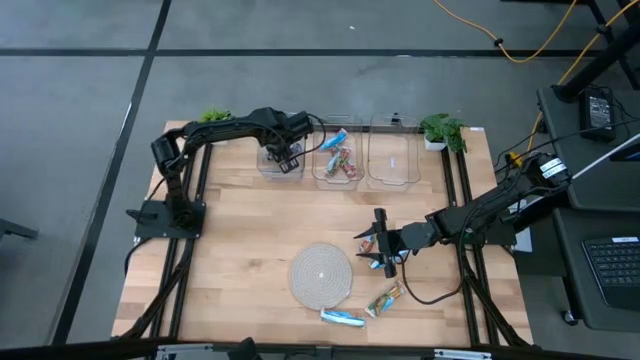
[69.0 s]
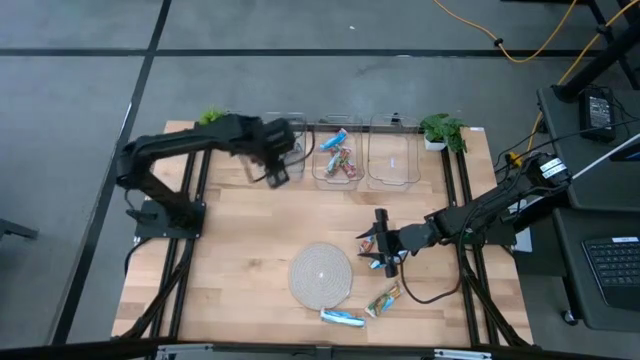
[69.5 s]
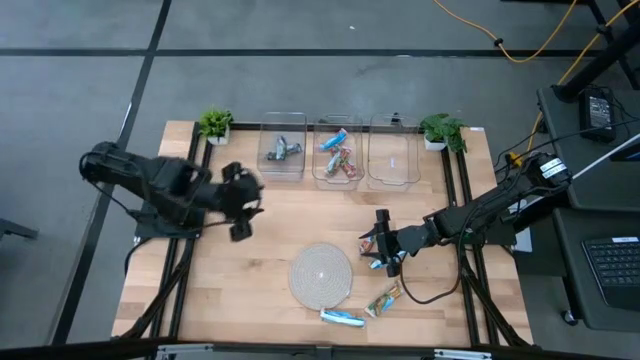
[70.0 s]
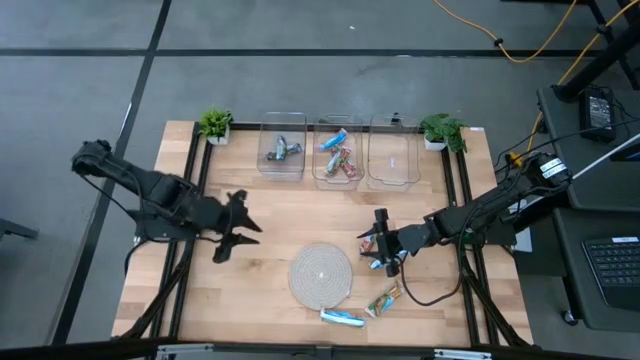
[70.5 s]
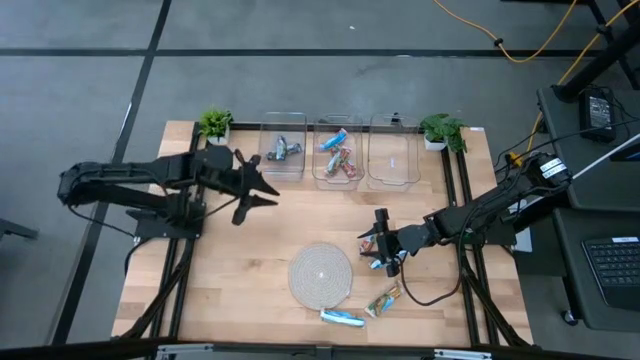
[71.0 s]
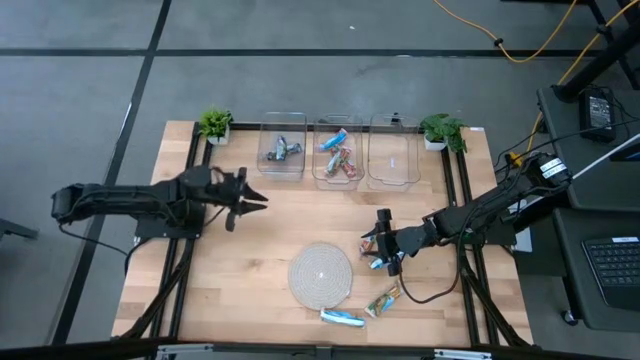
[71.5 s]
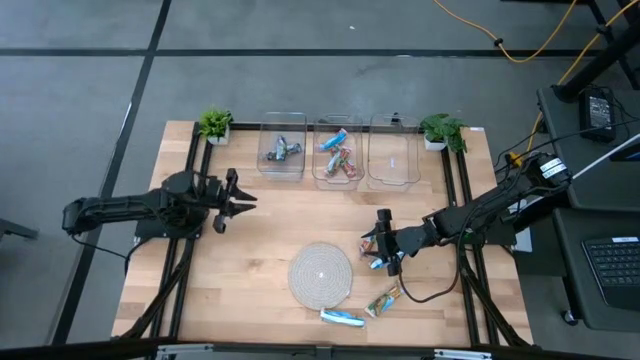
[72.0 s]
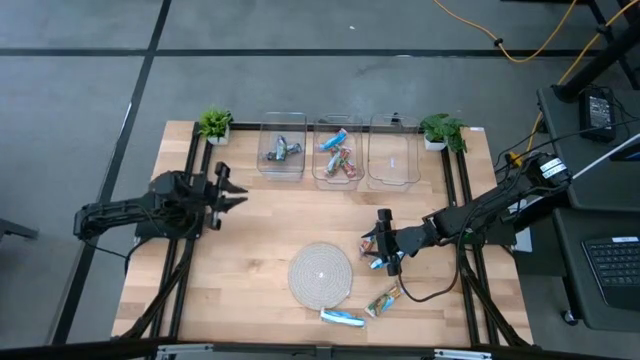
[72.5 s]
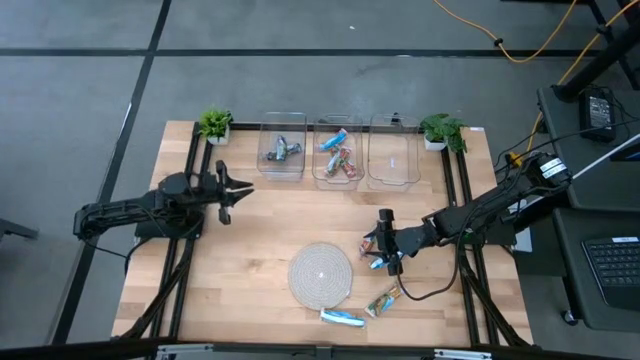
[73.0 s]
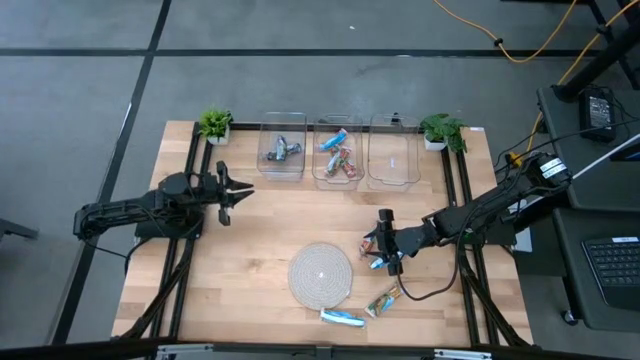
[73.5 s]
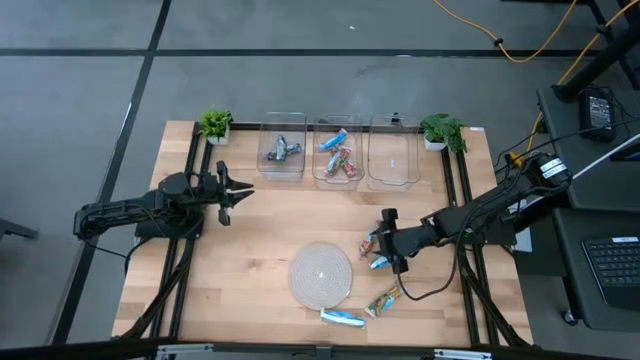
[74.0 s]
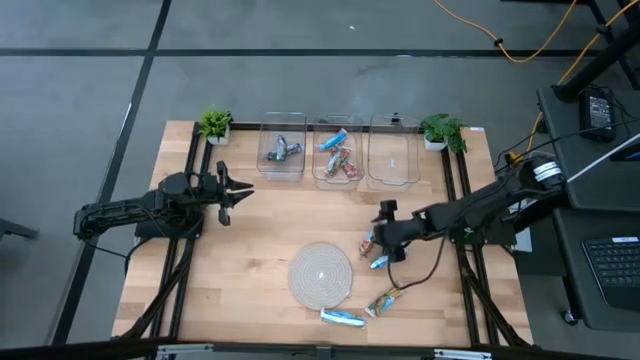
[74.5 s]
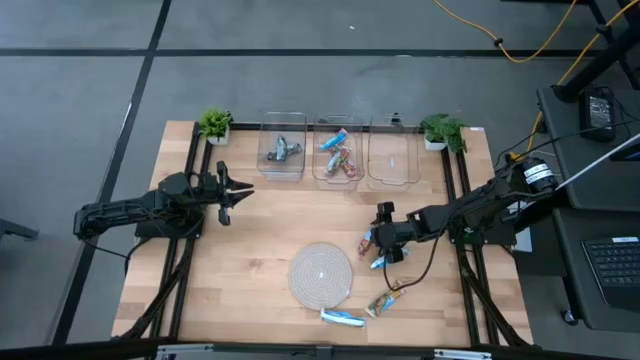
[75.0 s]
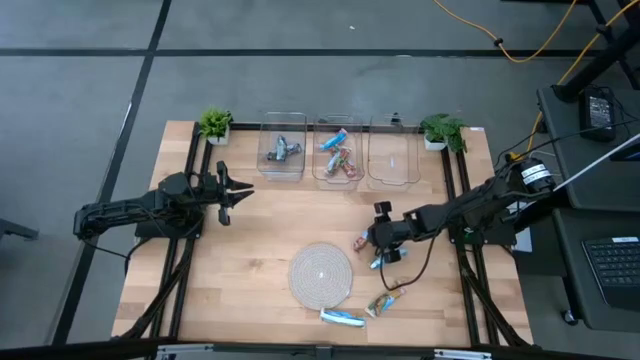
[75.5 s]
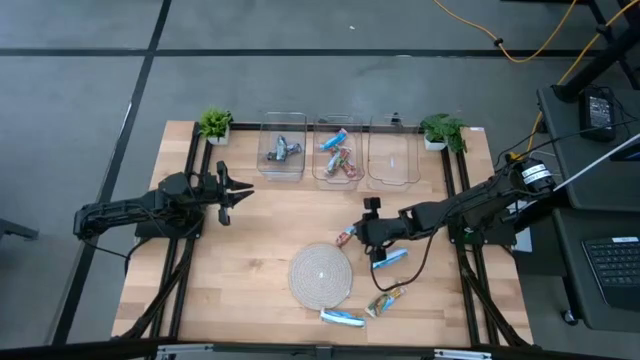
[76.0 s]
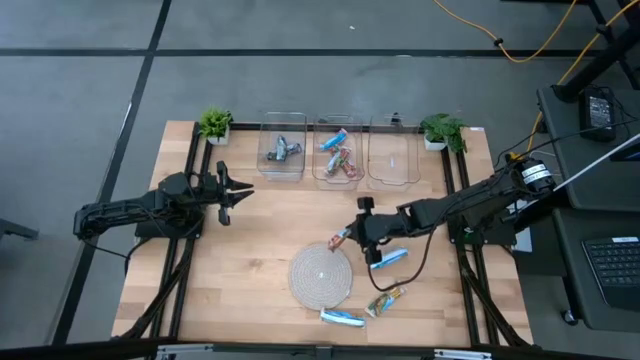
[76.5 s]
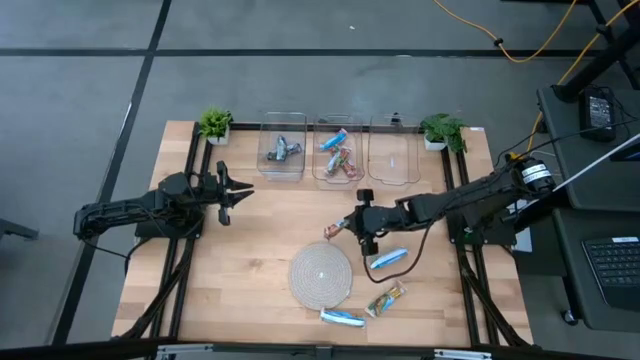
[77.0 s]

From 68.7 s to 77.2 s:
Task: Pick and place Granola Bars by type
Put the red granola bar into the center transparent bin

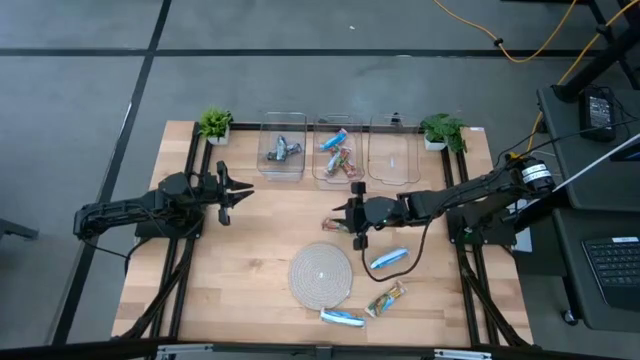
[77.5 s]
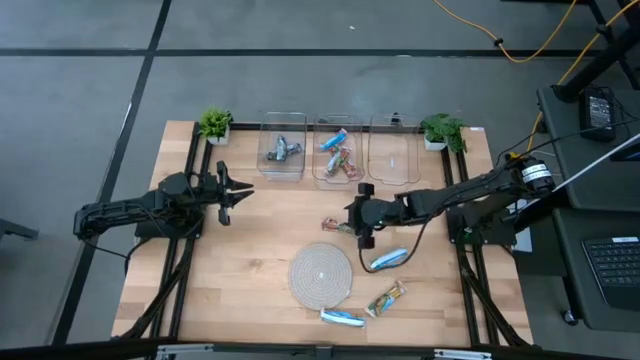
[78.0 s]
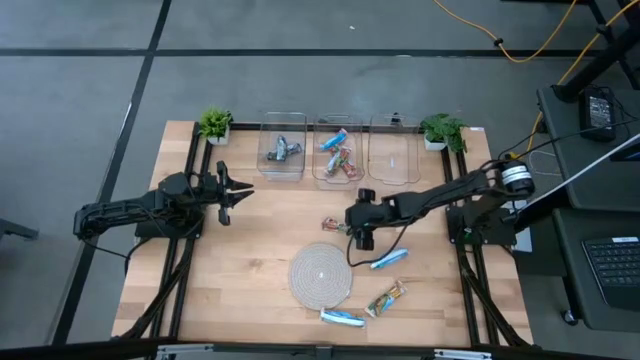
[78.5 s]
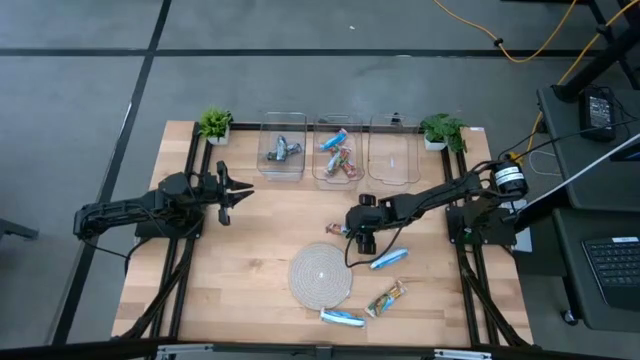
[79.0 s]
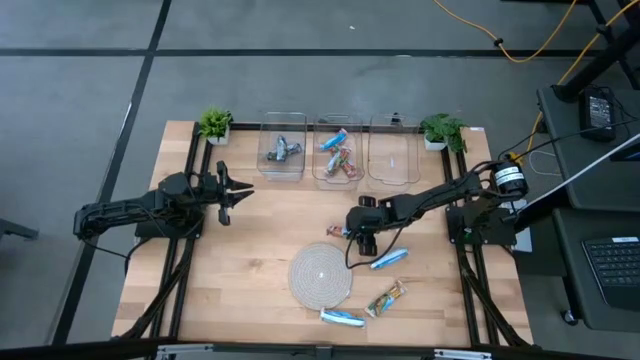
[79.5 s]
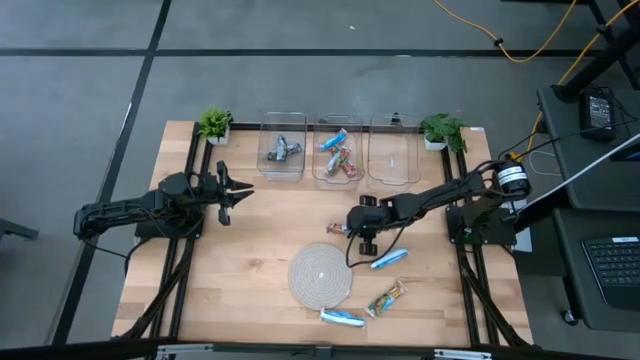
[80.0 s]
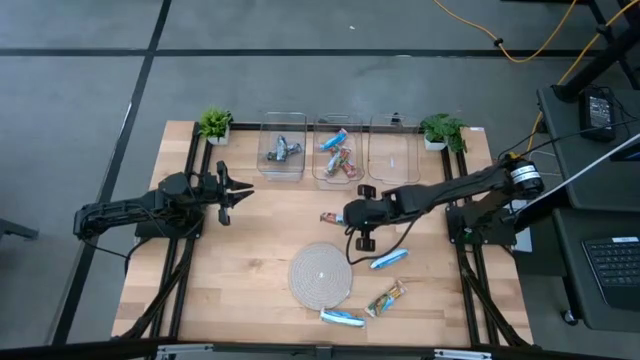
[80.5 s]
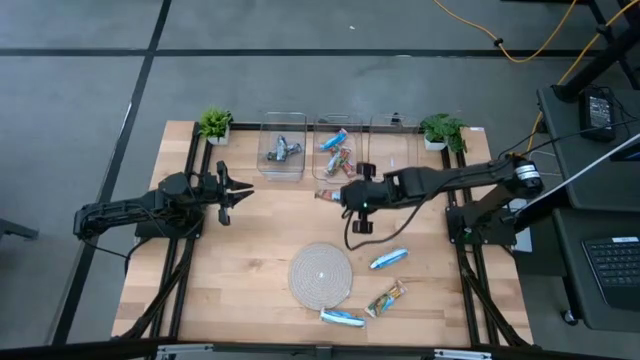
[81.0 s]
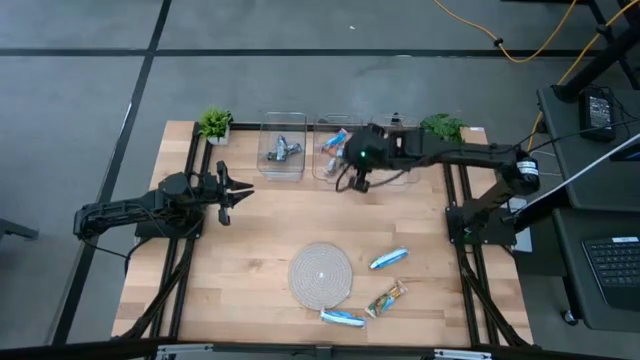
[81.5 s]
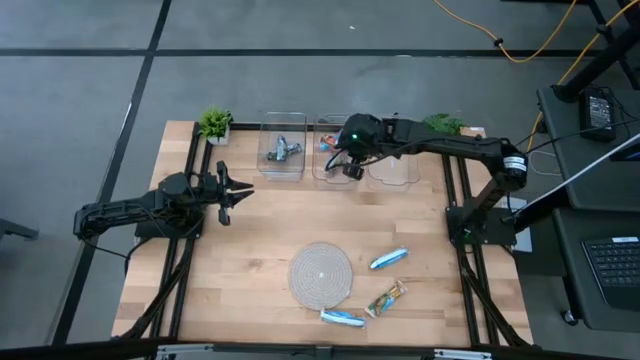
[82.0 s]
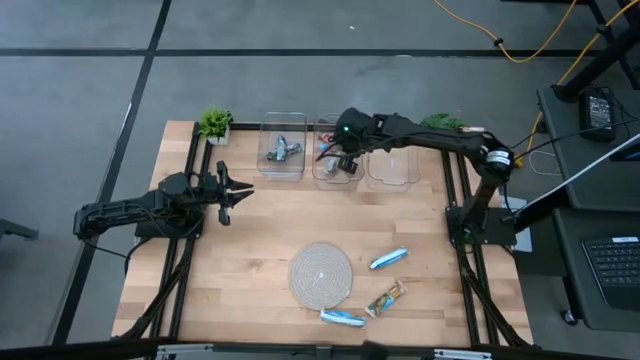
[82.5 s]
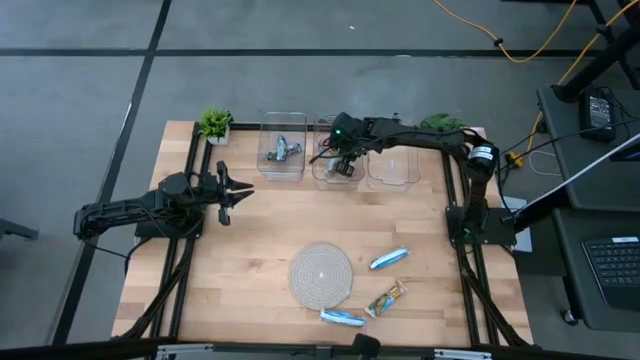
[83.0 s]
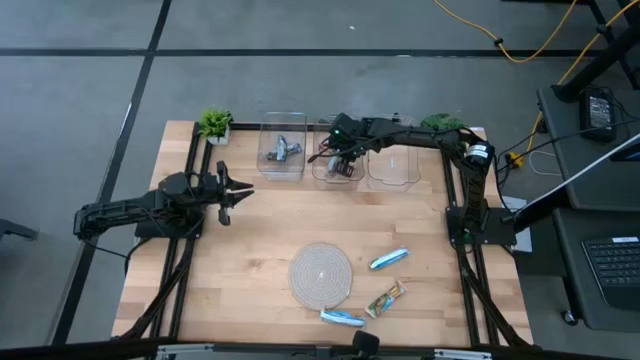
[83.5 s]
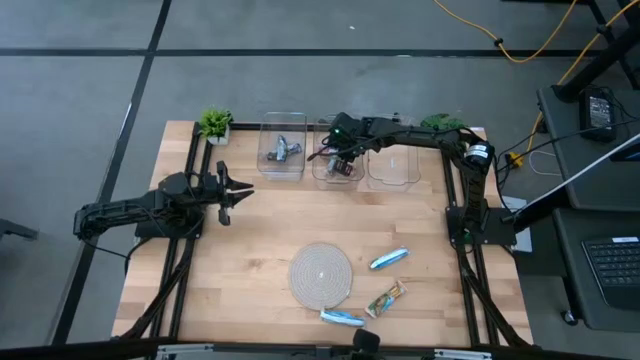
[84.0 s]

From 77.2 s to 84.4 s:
Put the red granola bar into the center transparent bin

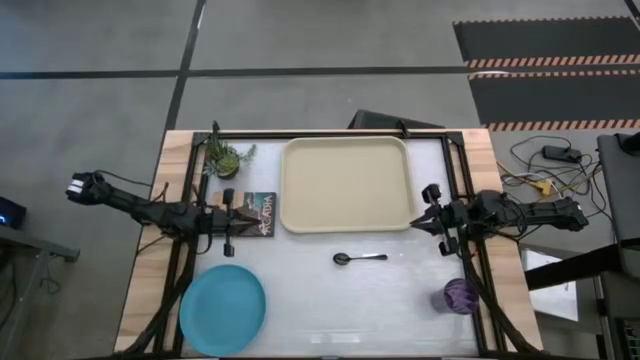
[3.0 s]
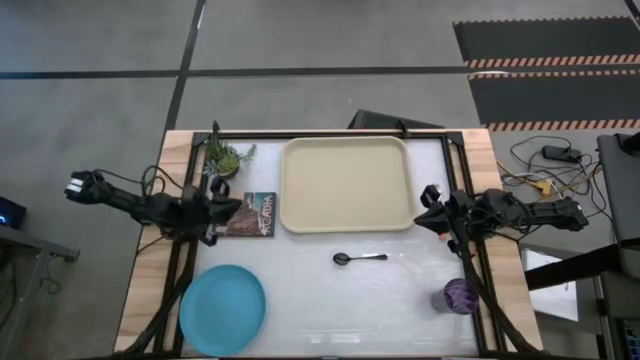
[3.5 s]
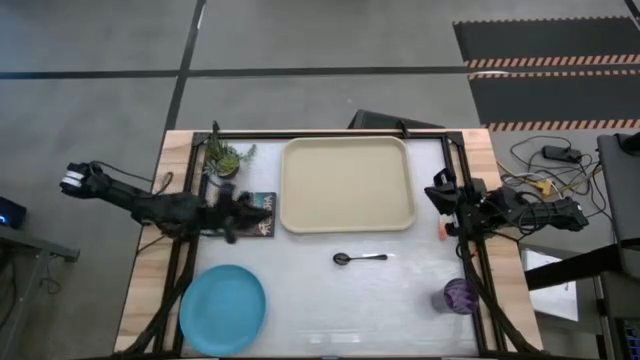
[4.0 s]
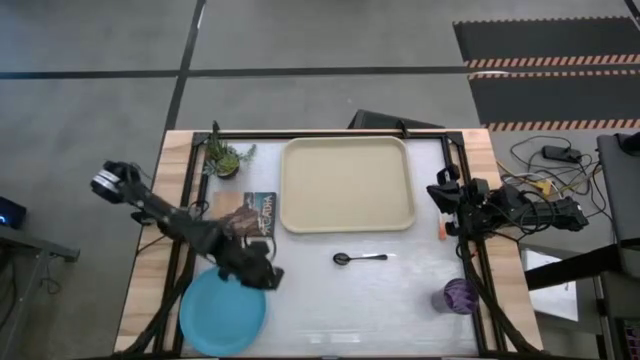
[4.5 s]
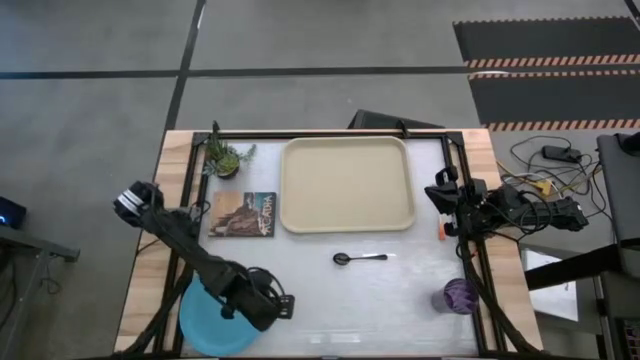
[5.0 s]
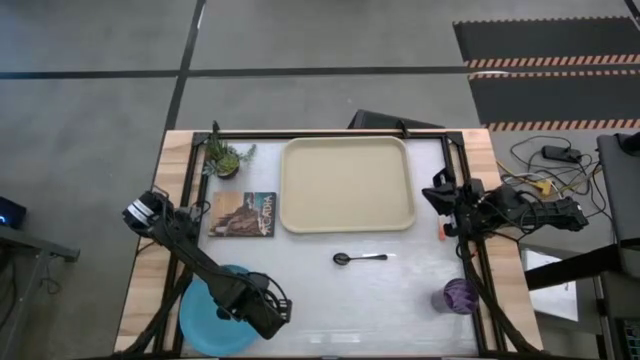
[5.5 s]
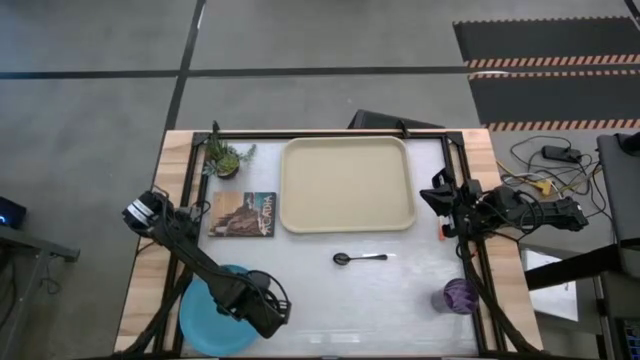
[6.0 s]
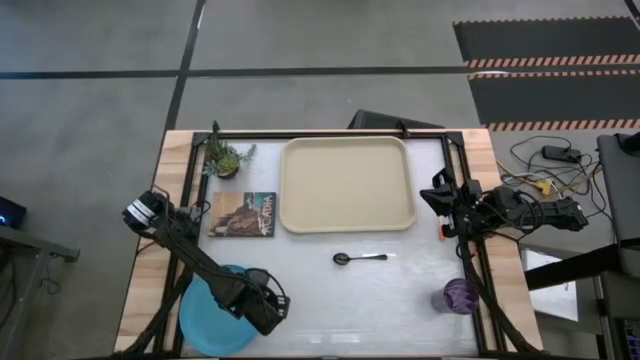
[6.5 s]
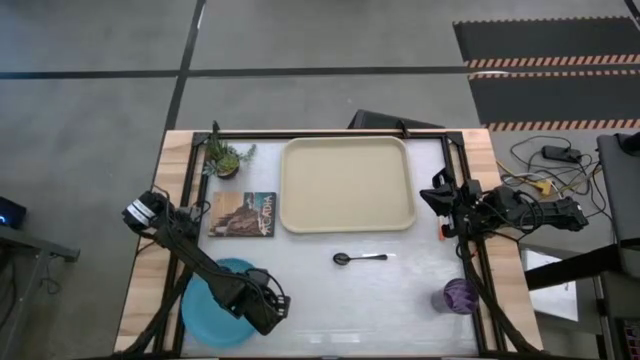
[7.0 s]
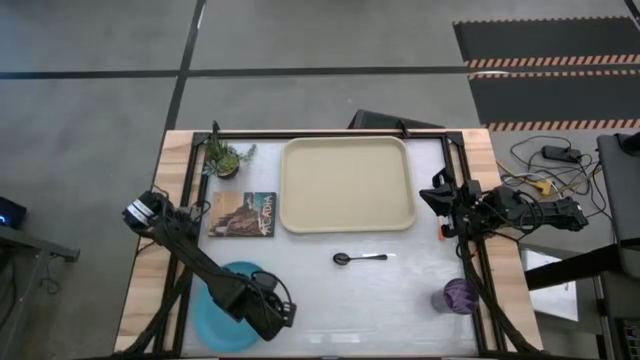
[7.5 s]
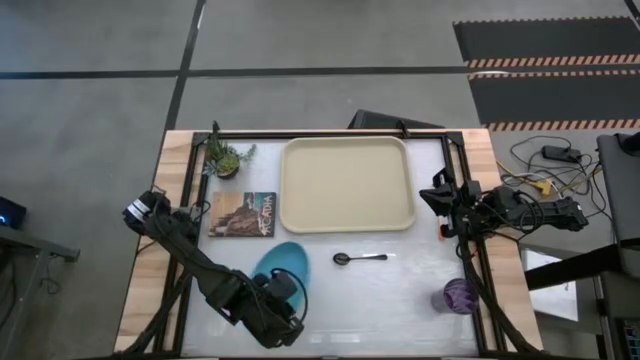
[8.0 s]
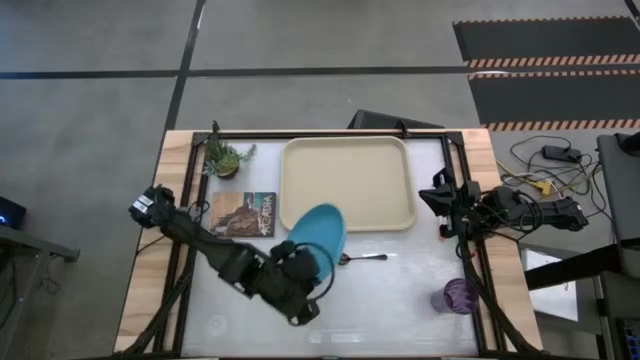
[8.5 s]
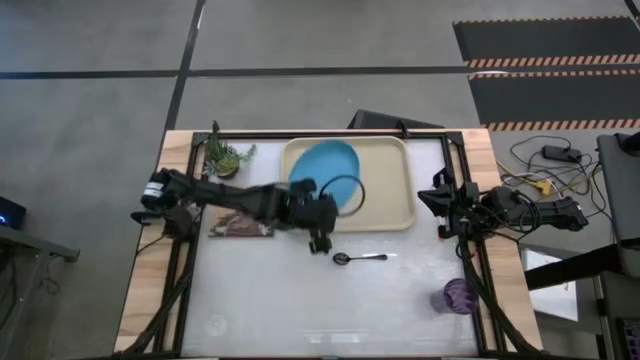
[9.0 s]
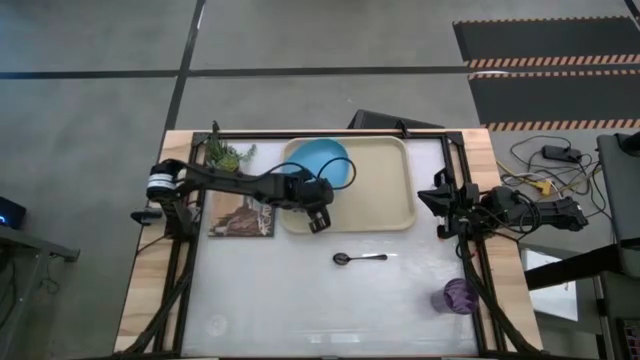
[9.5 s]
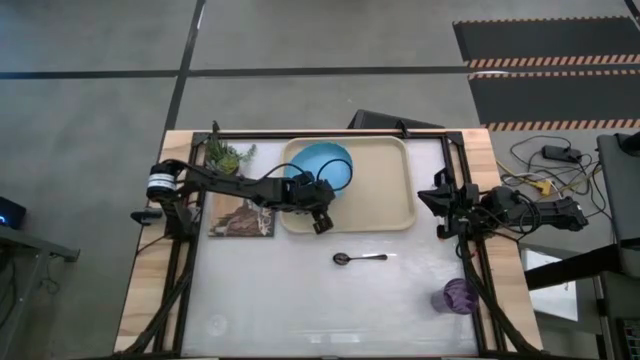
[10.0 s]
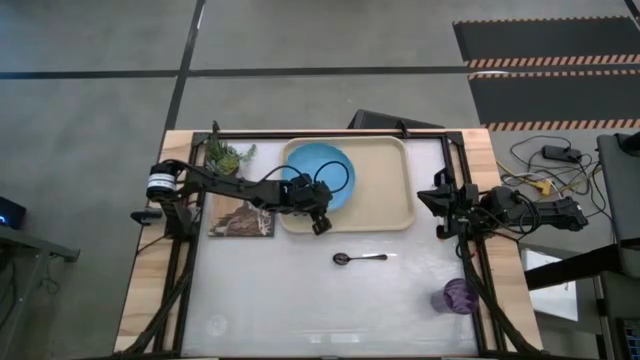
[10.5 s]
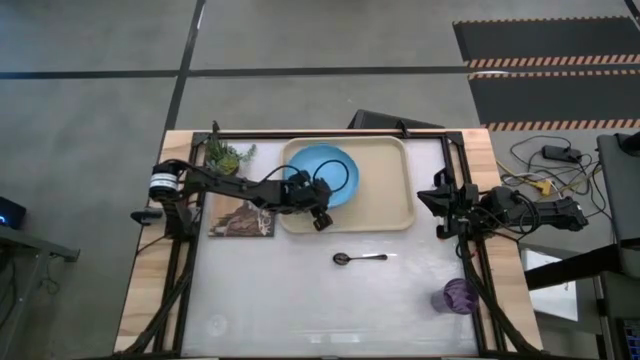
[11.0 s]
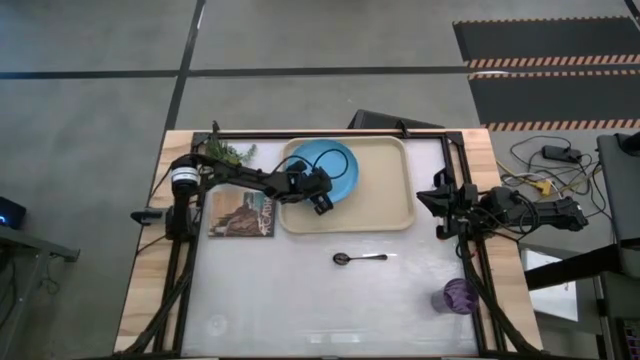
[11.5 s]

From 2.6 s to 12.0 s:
Task: Pick and place plate/cup/fork/spoon on tray
Put the blue plate on the left of the white tray
